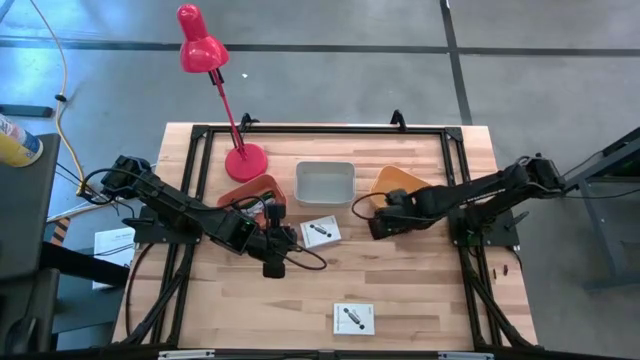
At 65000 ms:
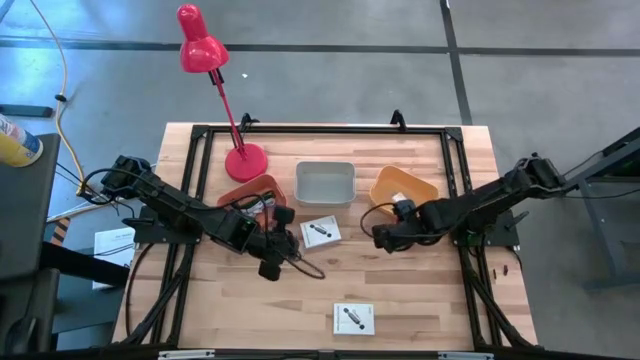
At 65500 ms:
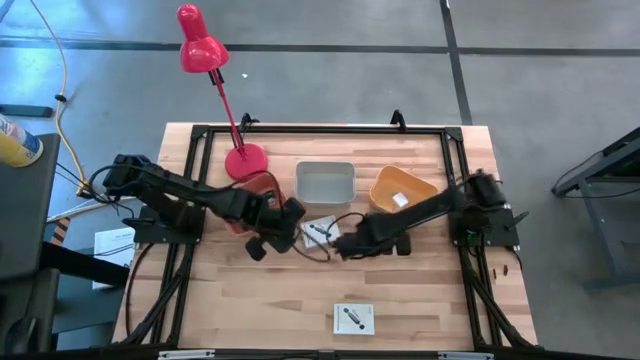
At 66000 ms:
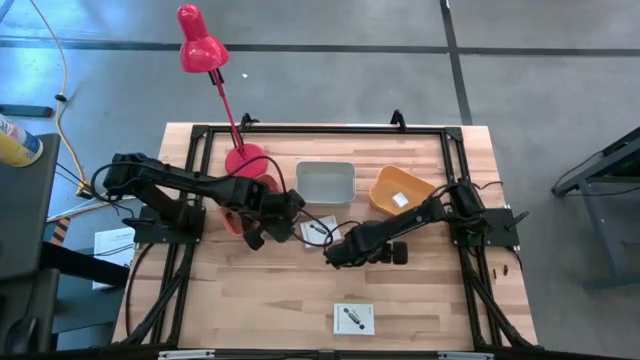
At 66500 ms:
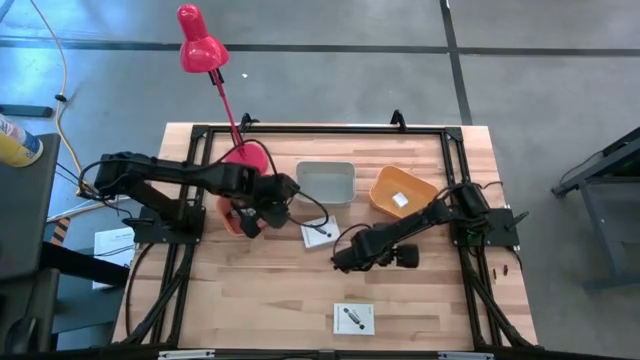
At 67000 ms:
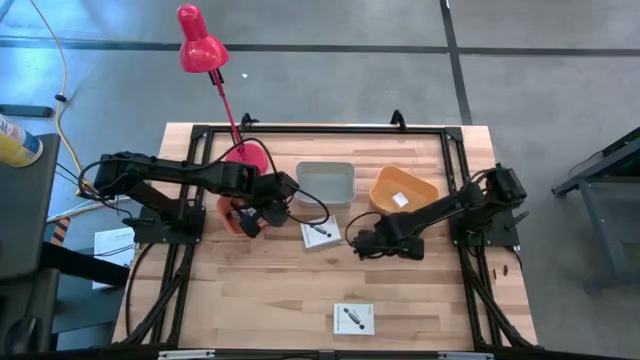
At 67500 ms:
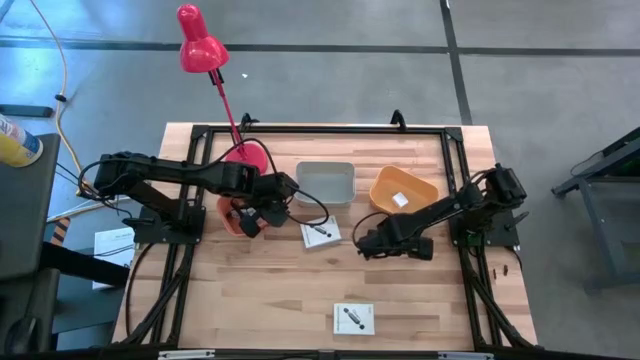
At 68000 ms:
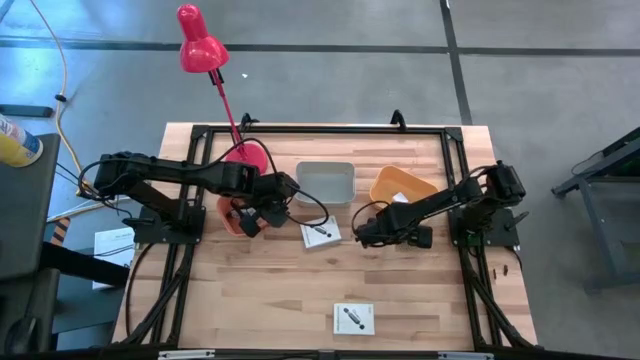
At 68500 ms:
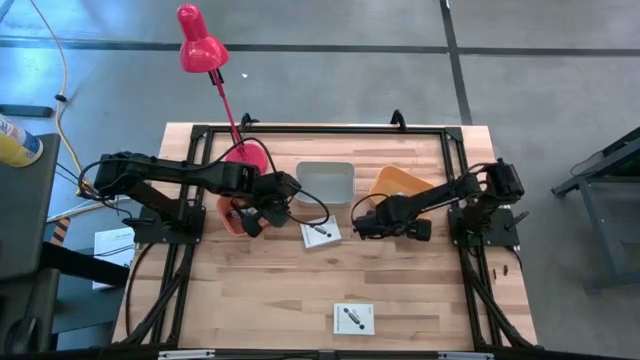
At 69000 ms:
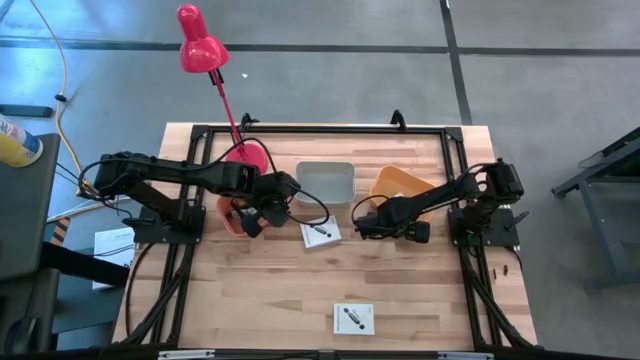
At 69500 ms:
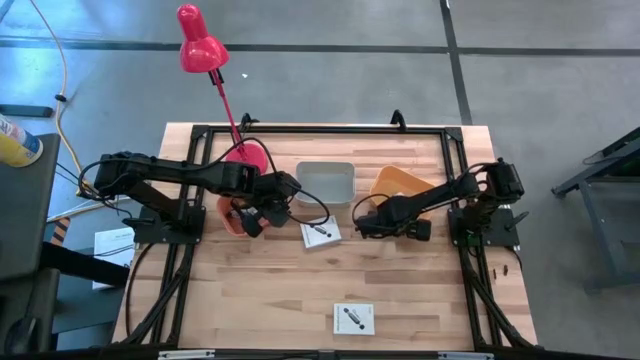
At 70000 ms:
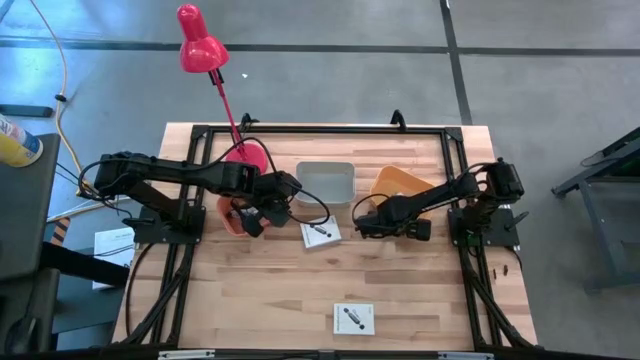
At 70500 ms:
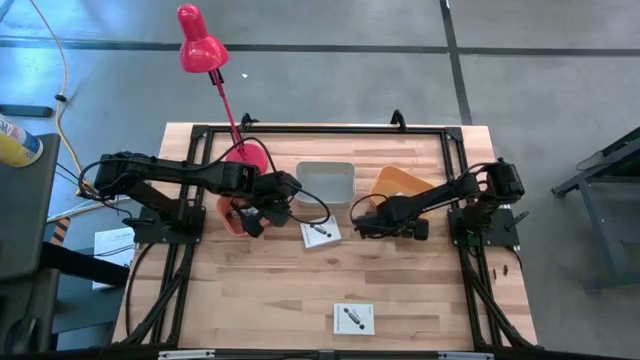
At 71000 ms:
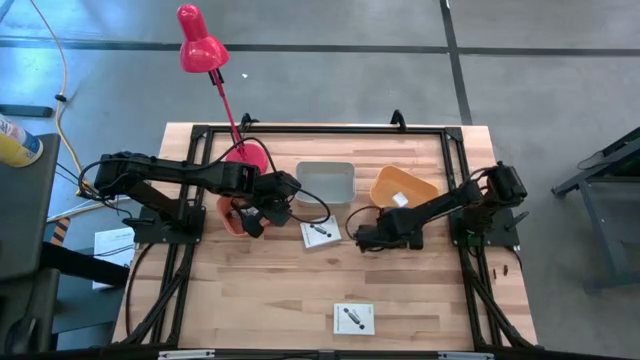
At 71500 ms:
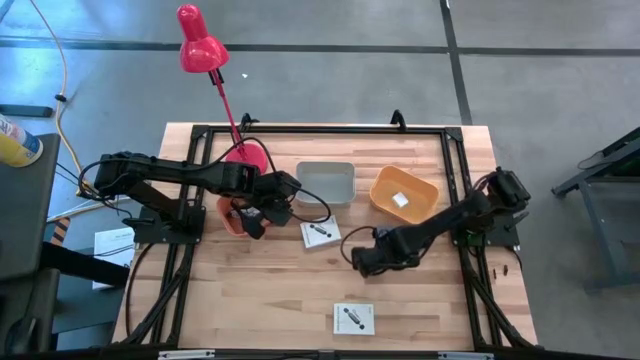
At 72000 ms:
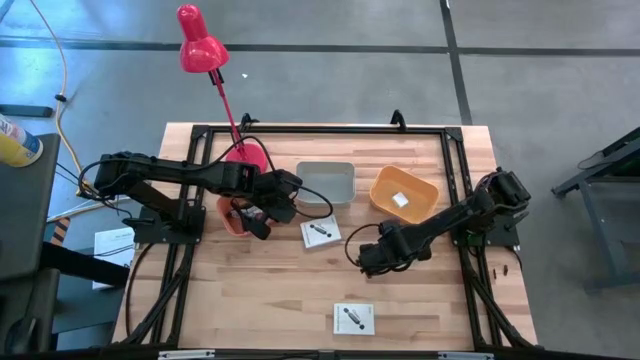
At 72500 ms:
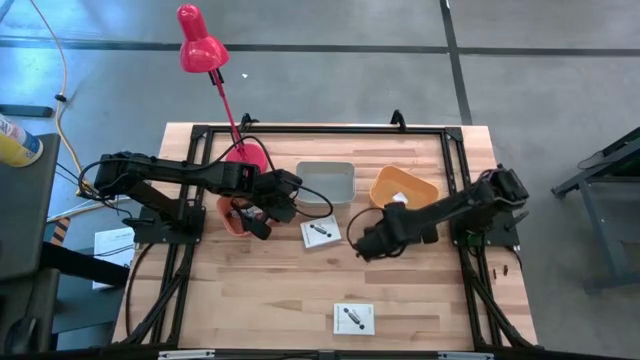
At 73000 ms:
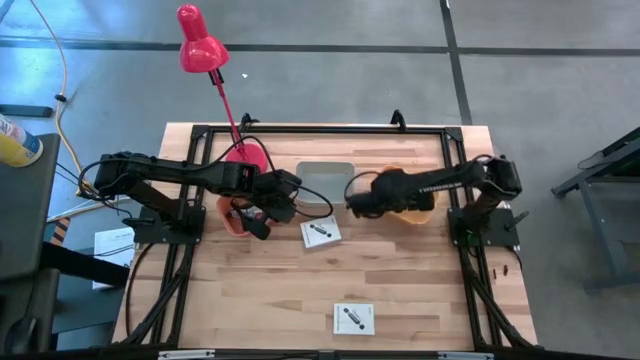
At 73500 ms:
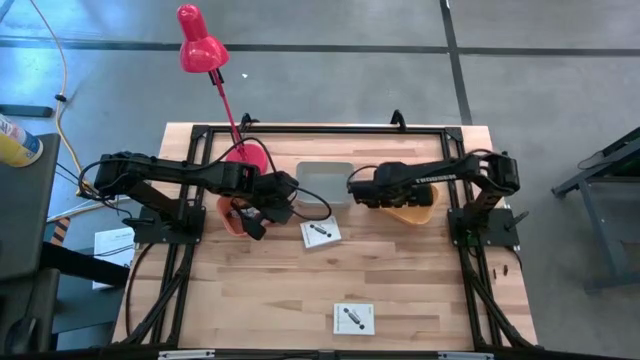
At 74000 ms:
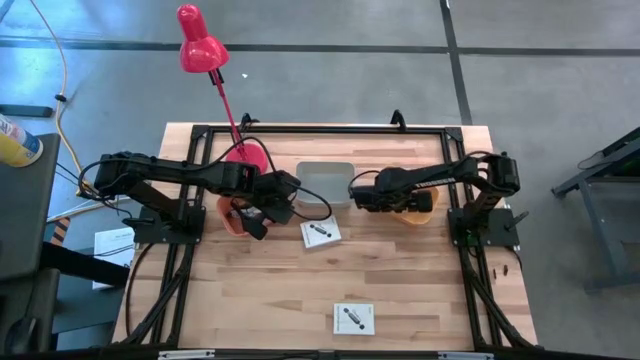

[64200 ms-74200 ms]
Task: Pick and place items into bin
Put the pink charger adapter into the orange bin
